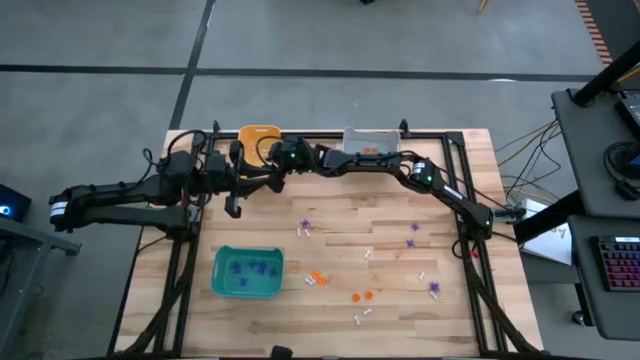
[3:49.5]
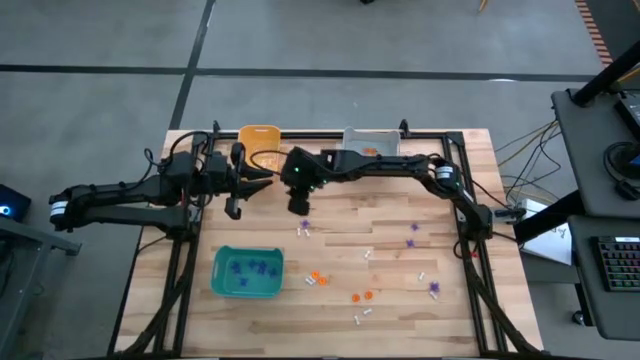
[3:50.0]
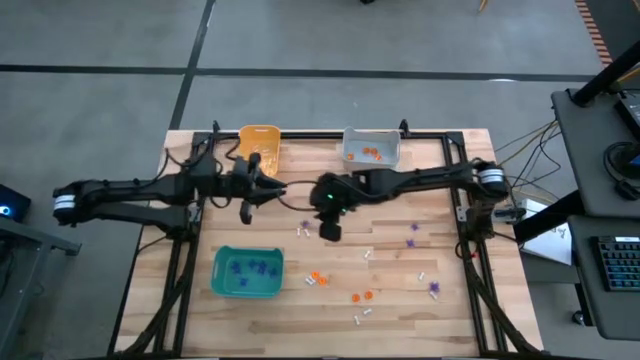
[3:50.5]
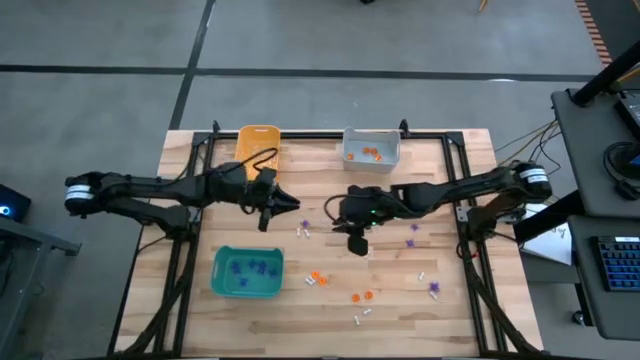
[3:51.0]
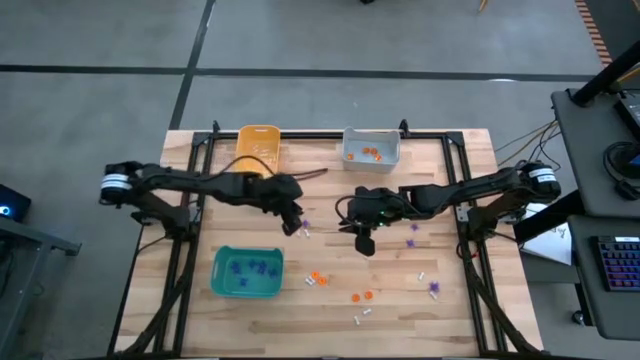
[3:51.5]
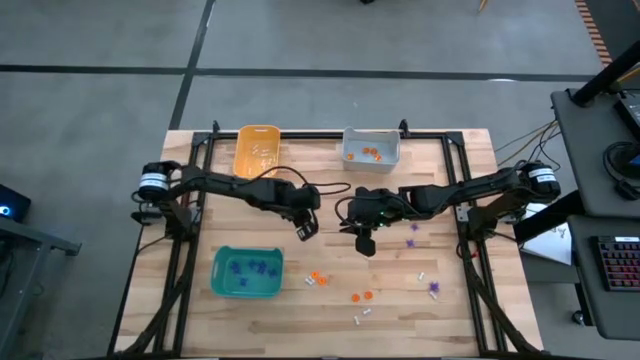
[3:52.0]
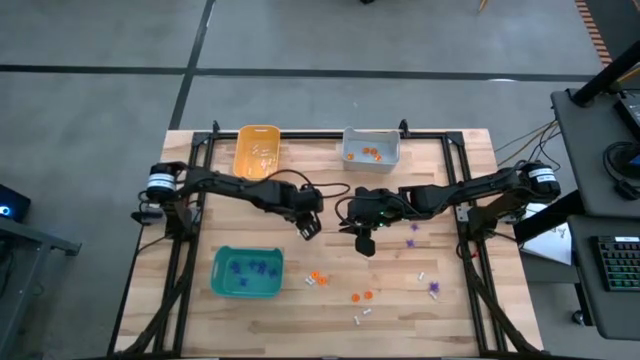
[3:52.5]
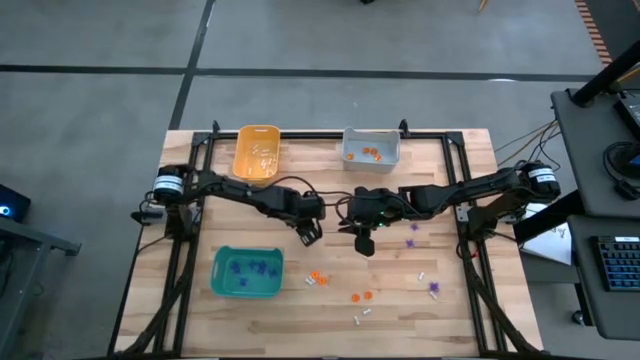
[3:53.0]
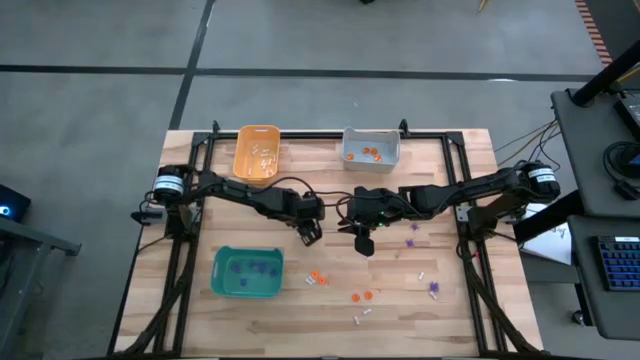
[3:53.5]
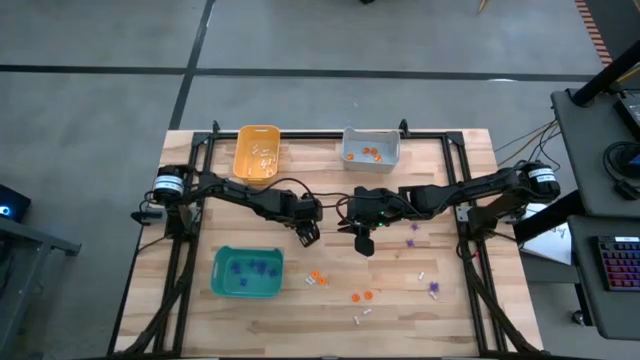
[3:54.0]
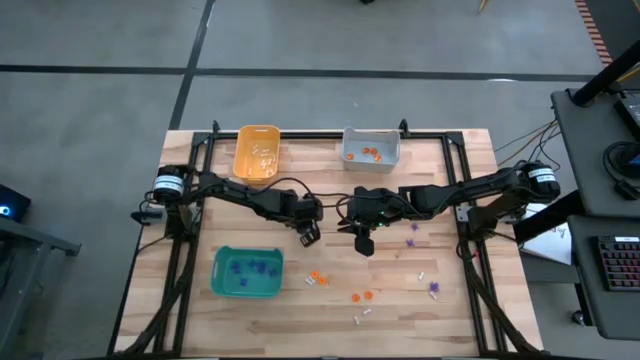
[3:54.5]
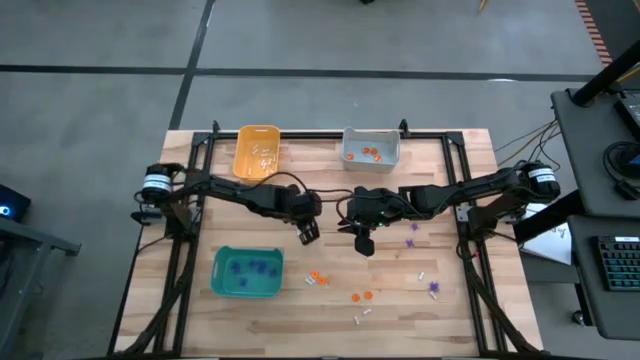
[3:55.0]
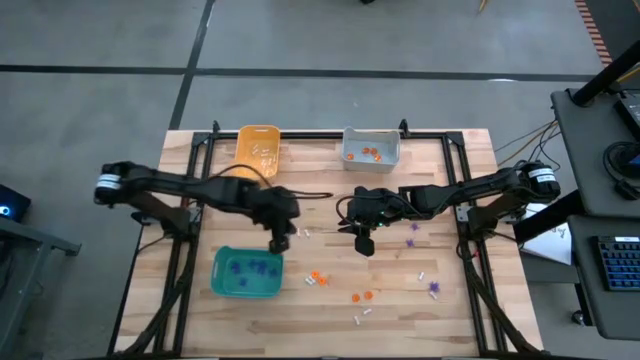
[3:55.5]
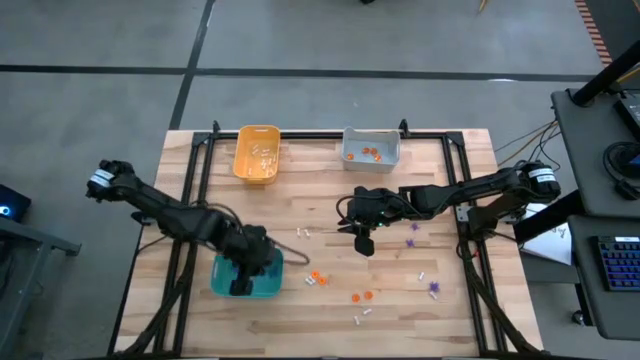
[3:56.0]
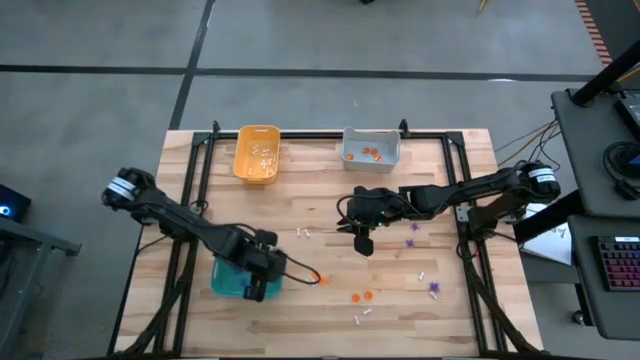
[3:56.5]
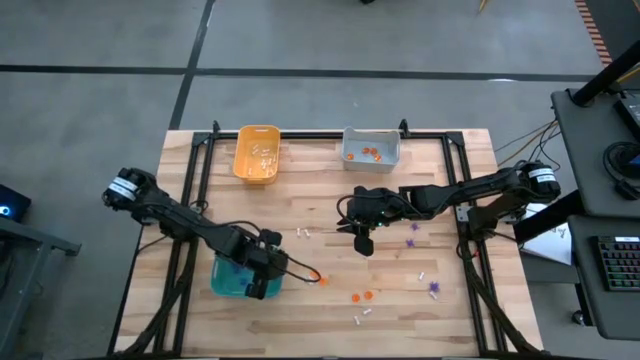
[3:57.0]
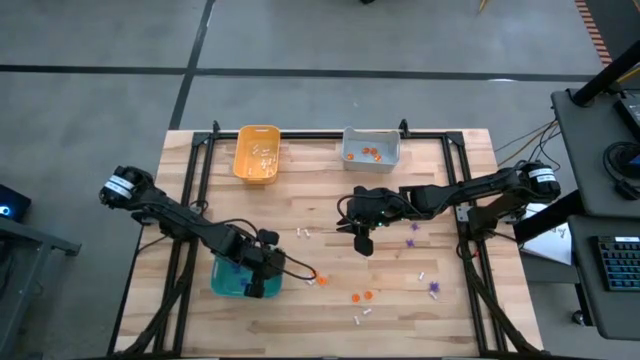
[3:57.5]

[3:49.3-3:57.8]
Task: Sort Halloween decoration
Put the blue spider toy into the green bin

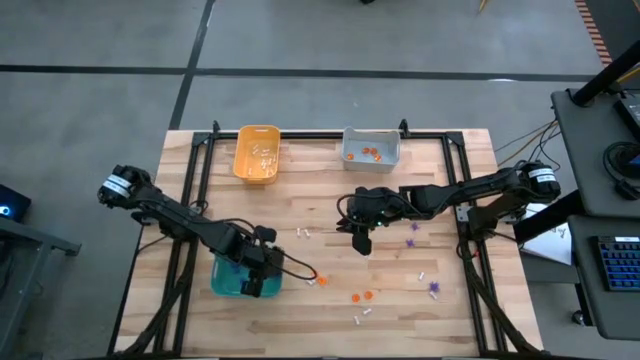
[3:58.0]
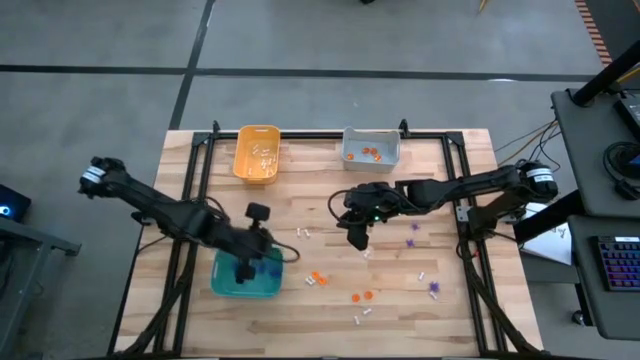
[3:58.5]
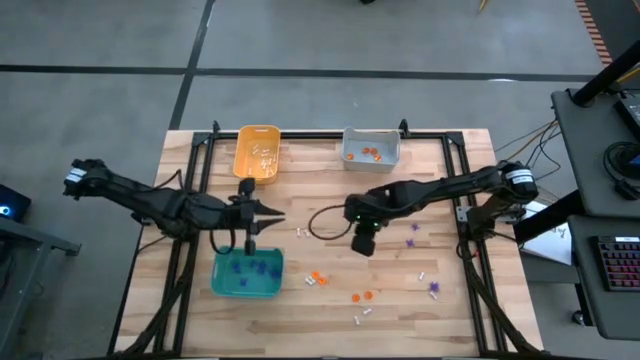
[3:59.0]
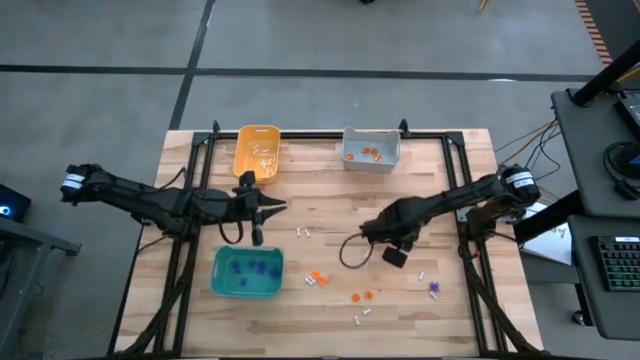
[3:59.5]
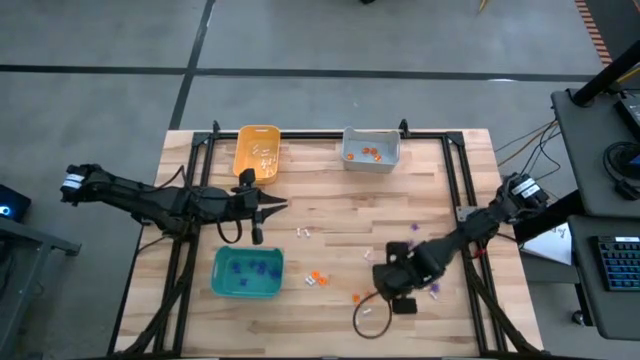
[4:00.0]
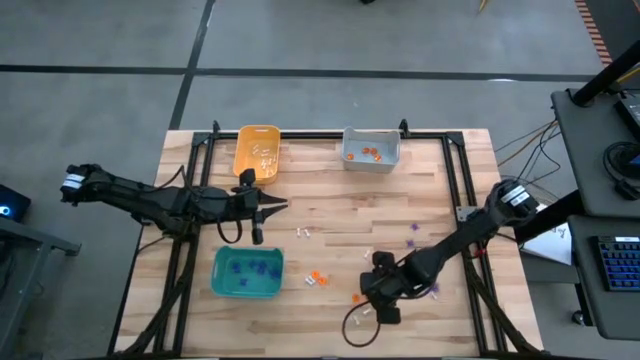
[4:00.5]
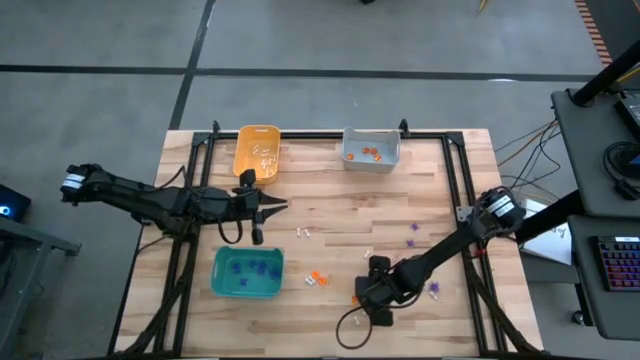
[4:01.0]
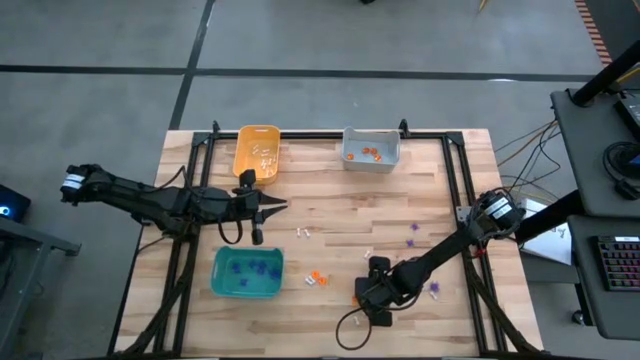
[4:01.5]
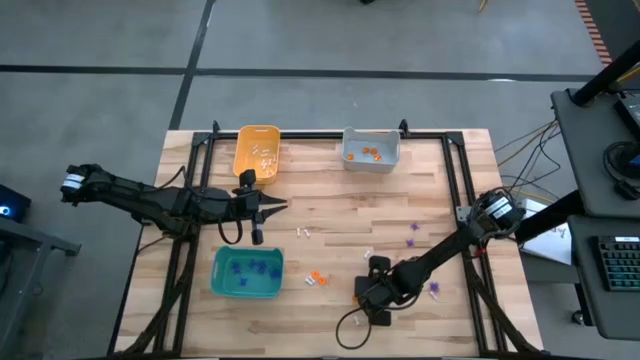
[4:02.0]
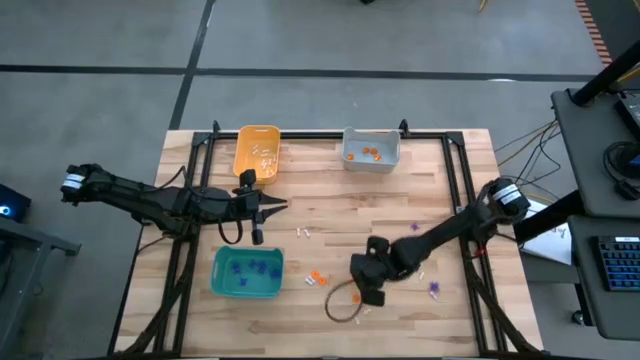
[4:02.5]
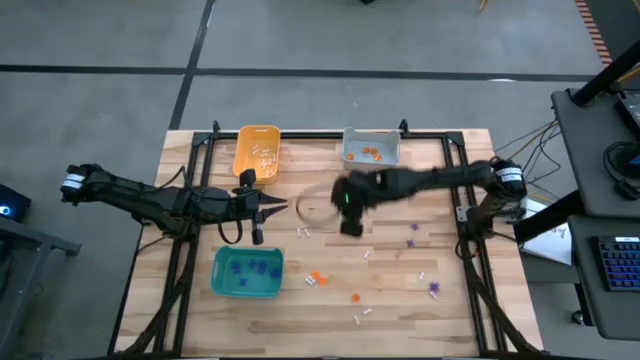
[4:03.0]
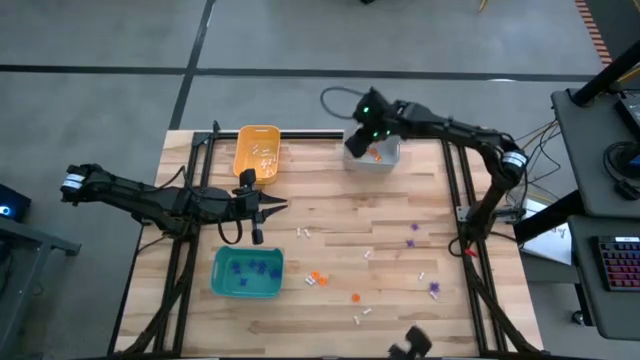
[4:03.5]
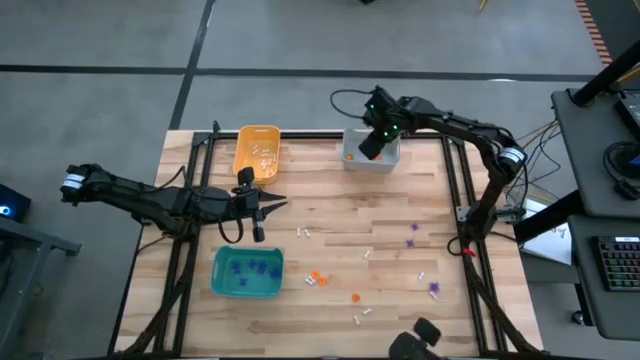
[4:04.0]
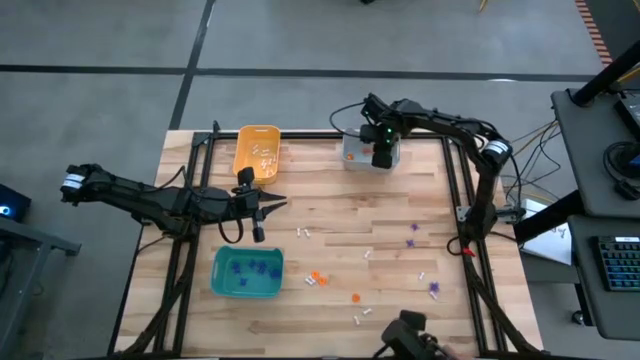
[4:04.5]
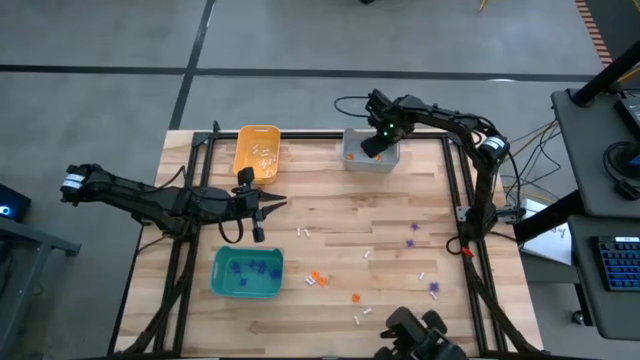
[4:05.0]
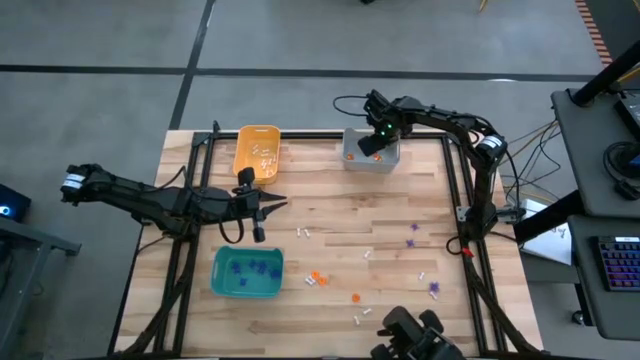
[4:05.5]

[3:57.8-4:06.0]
Put the orange pumpkin toy into the gray bin

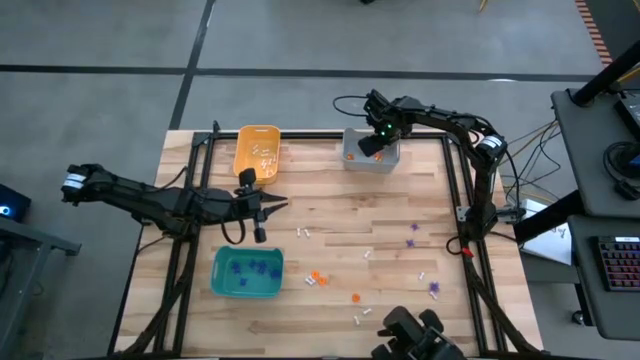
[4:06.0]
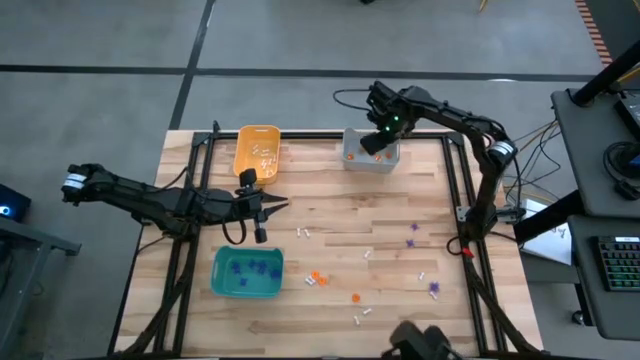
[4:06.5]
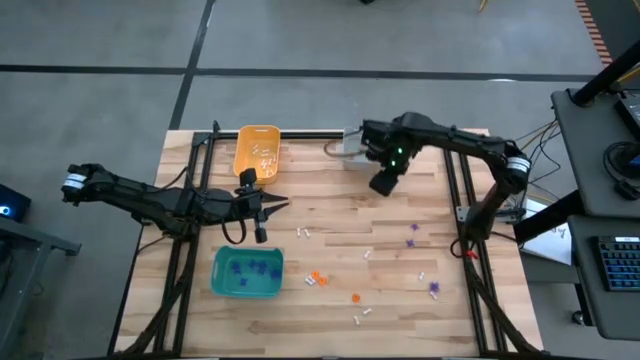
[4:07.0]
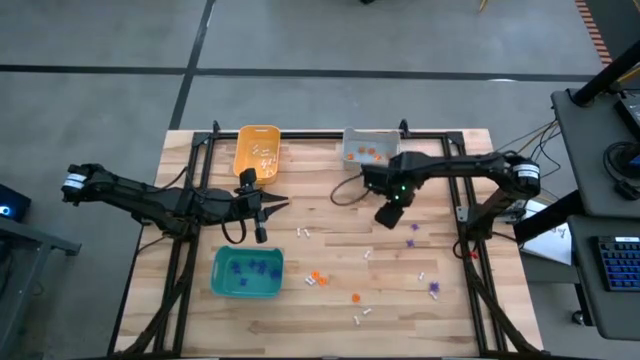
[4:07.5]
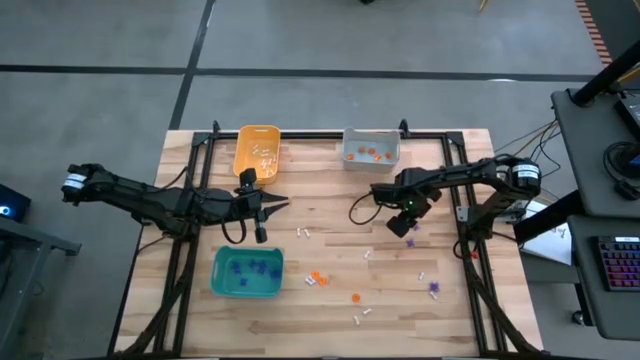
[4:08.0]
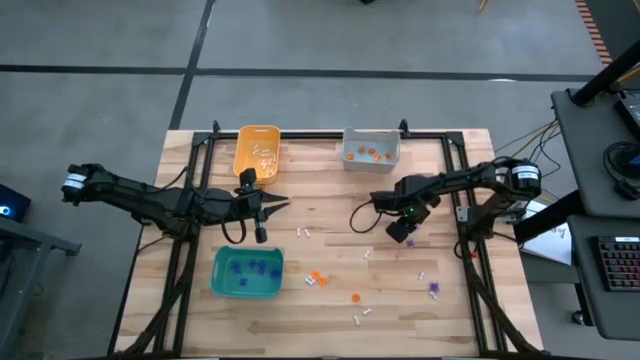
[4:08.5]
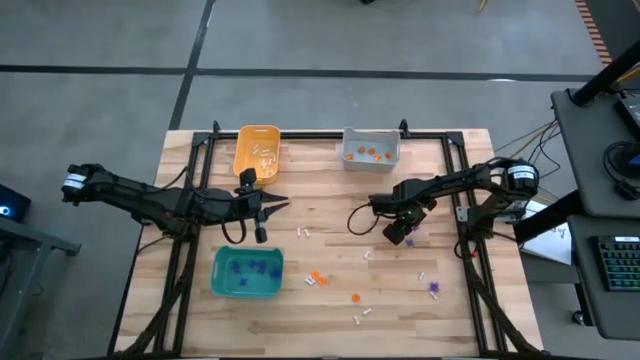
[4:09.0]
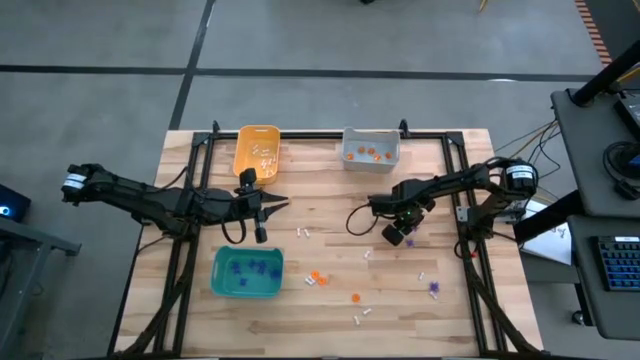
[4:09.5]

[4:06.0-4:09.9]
Put the blue spider toy into the green bin

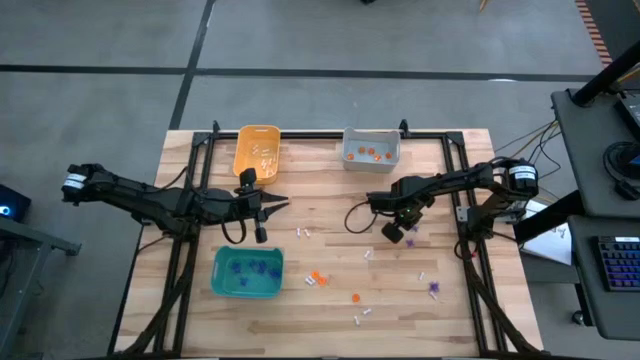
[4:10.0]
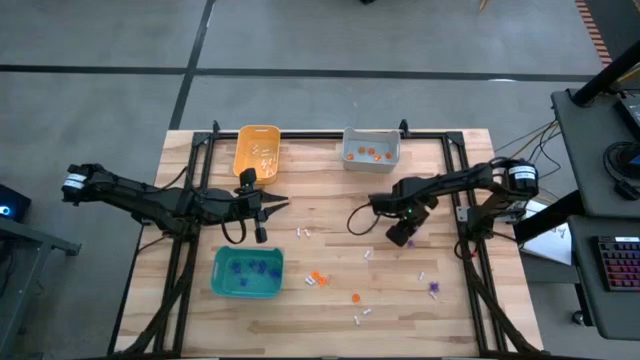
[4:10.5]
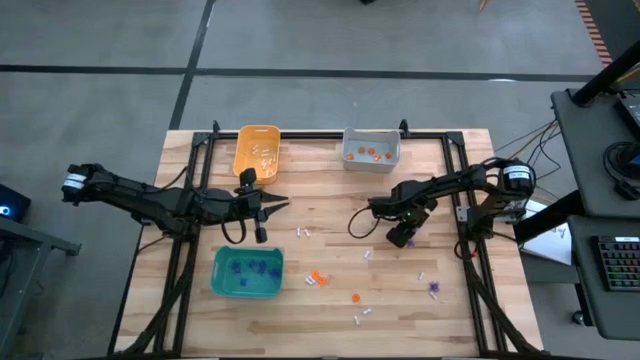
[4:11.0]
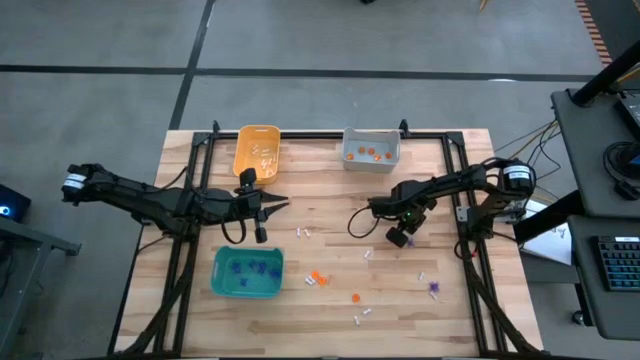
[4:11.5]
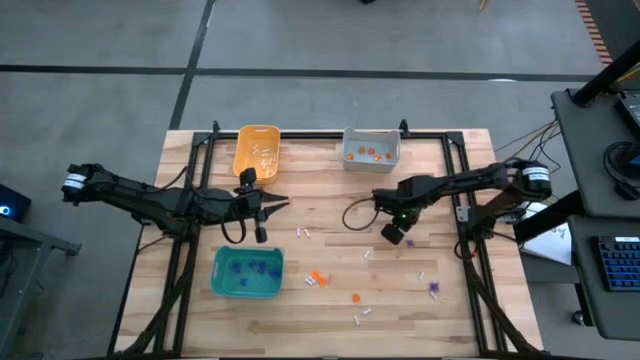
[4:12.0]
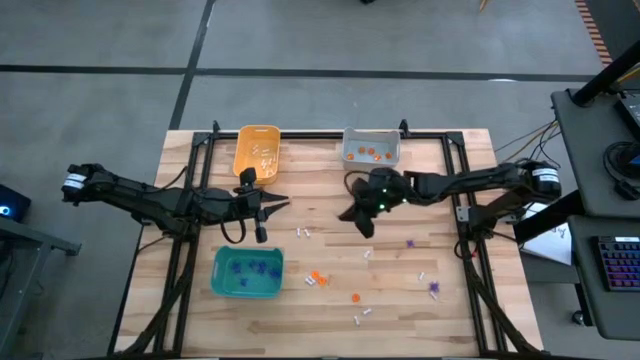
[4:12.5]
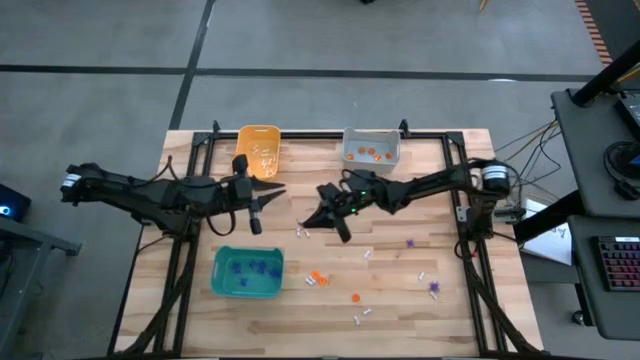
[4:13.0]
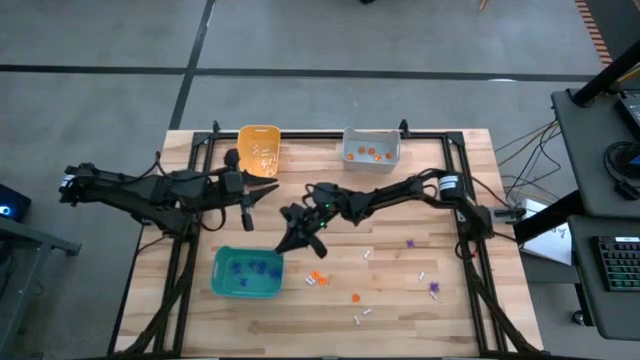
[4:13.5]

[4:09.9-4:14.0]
Put the blue spider toy into the green bin
